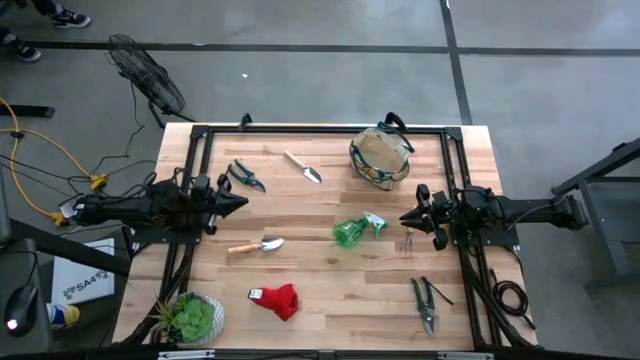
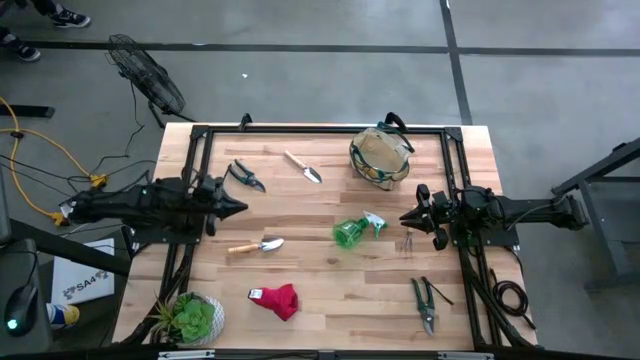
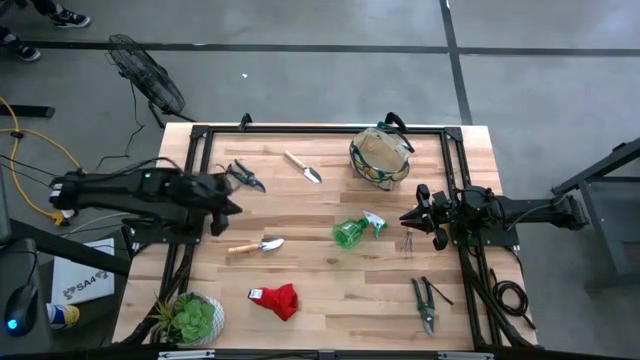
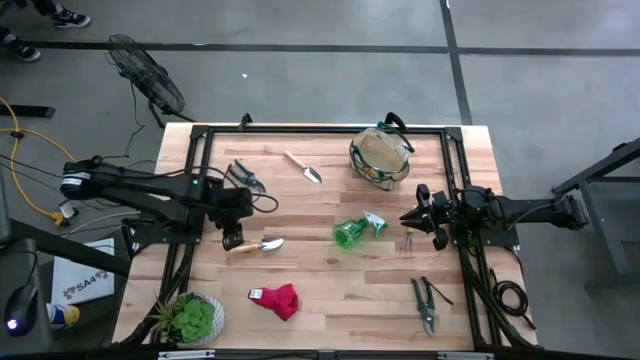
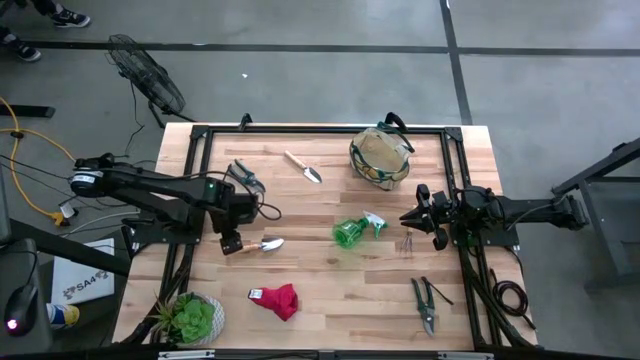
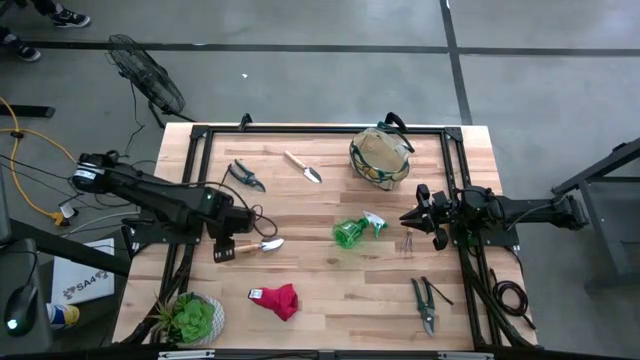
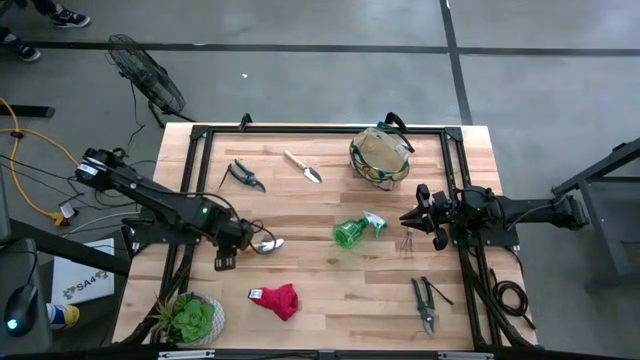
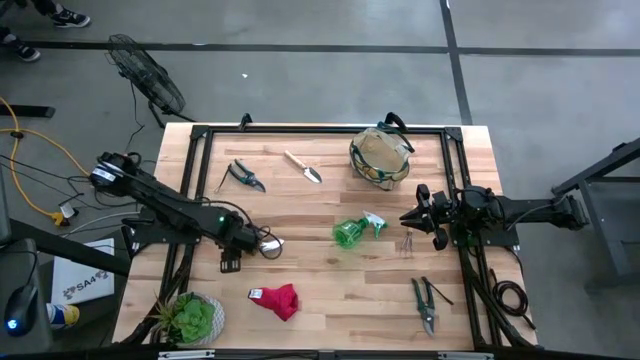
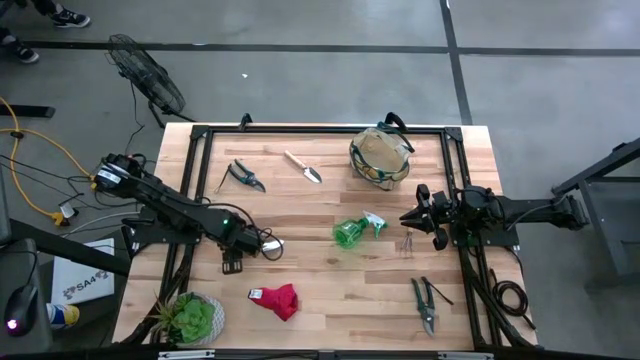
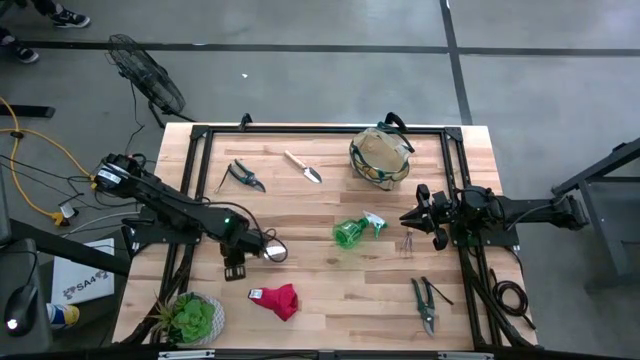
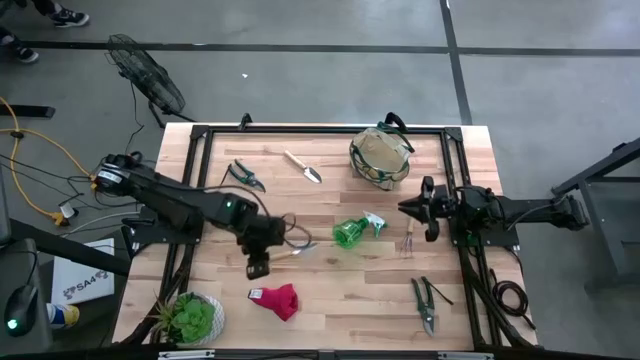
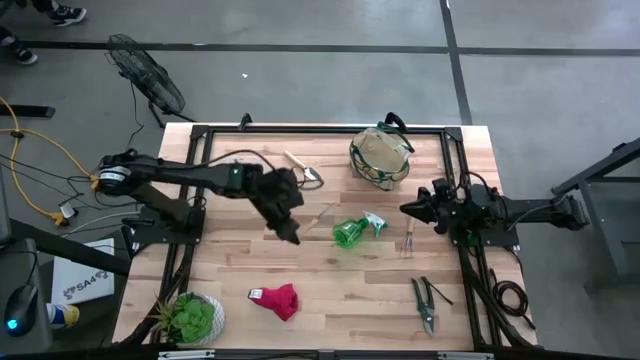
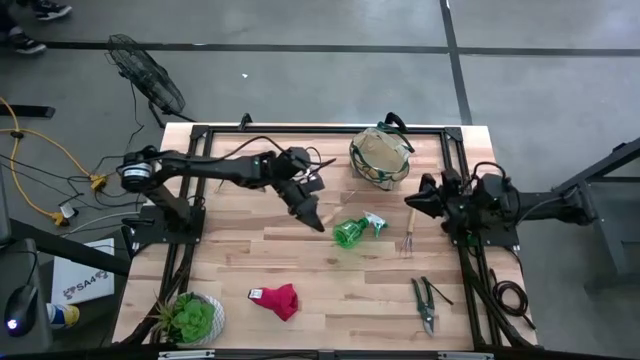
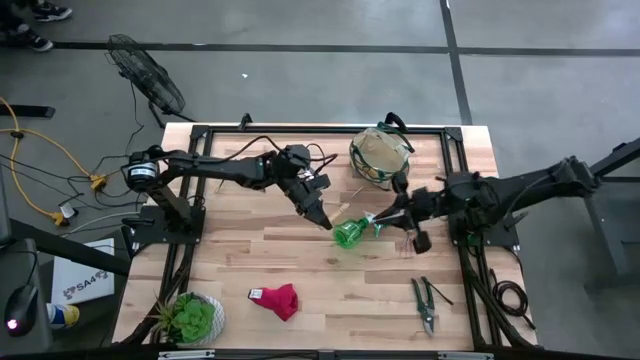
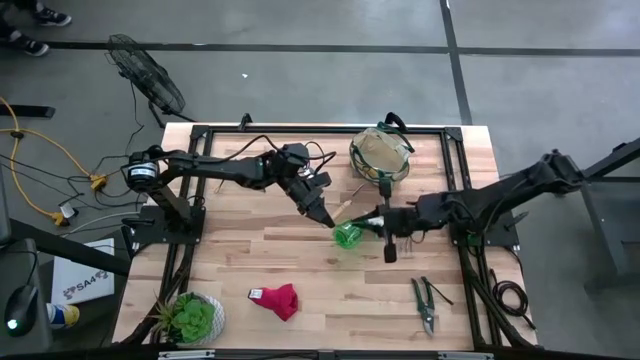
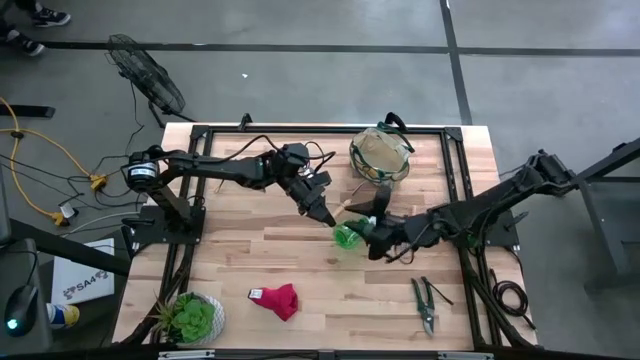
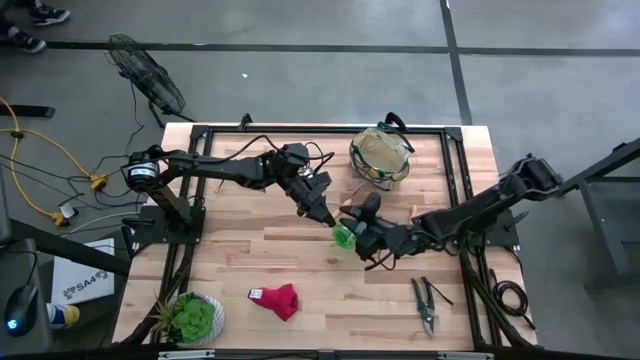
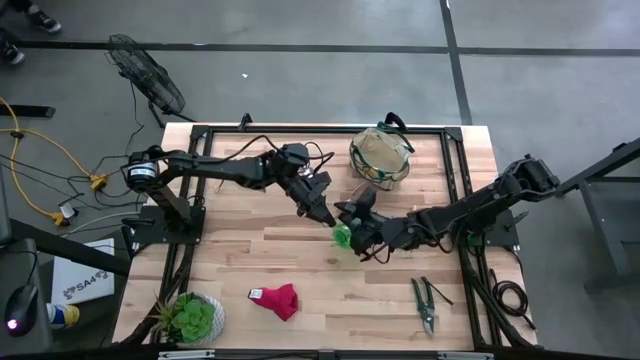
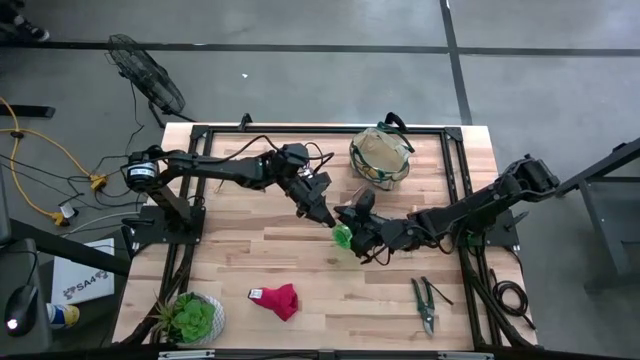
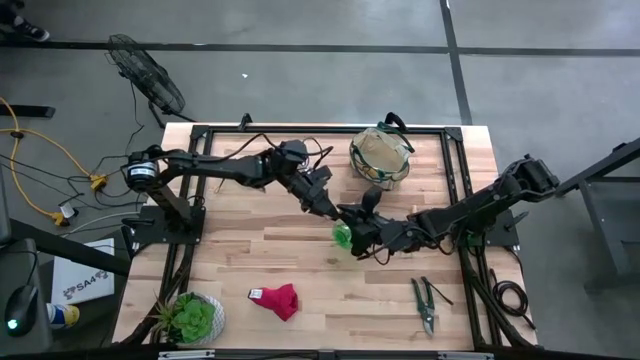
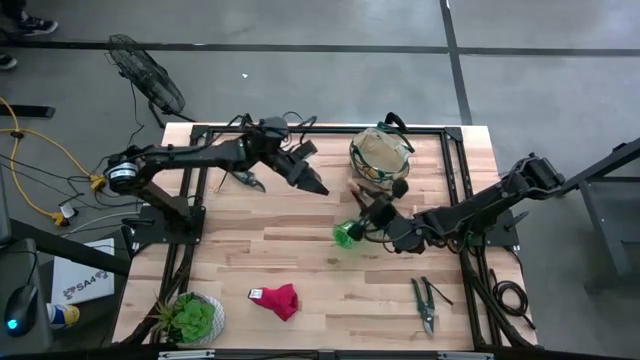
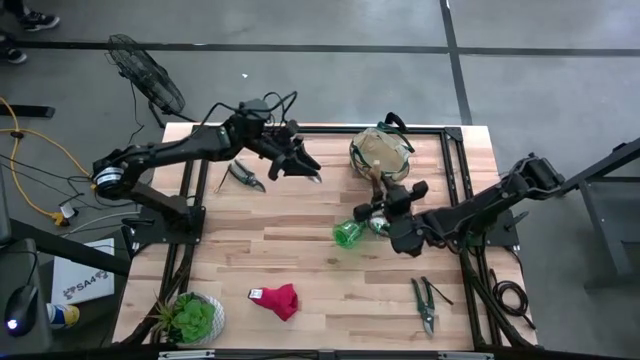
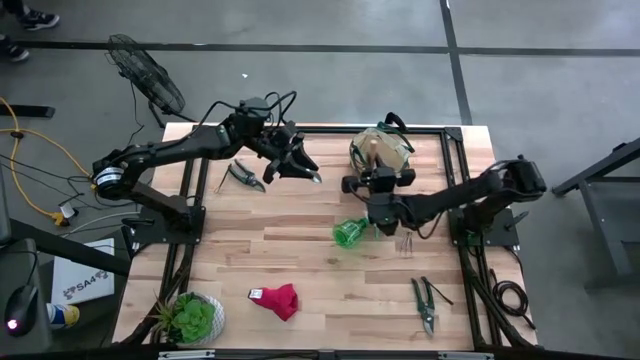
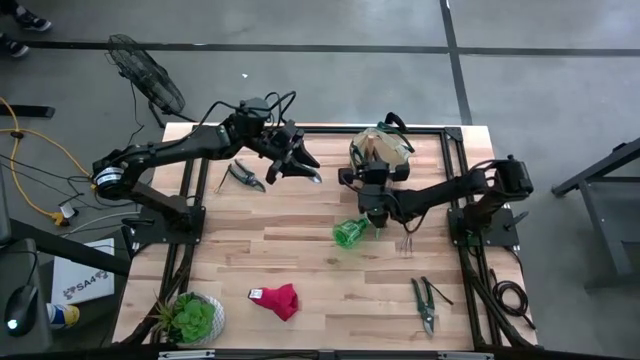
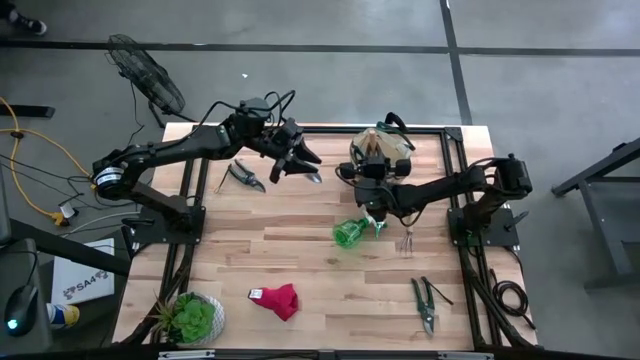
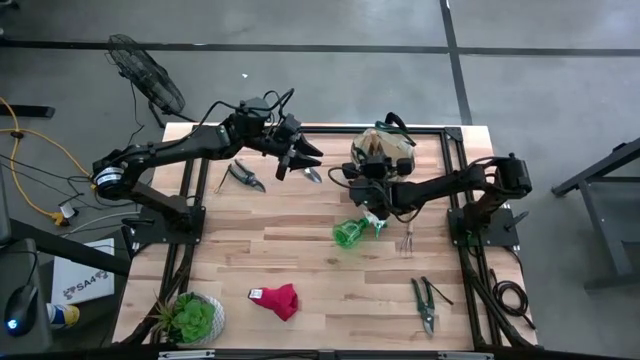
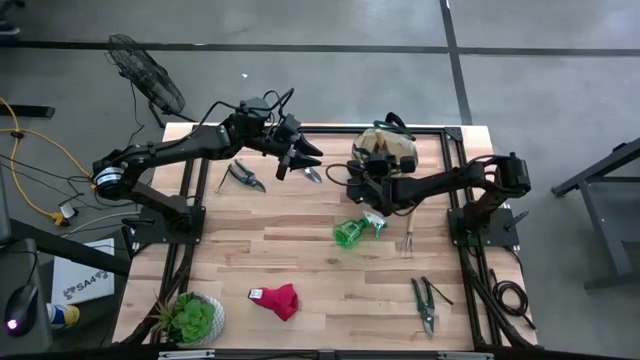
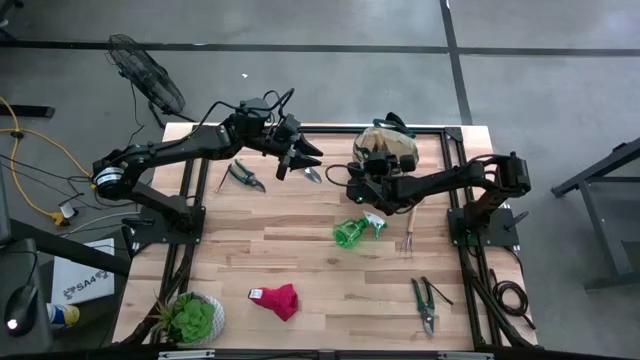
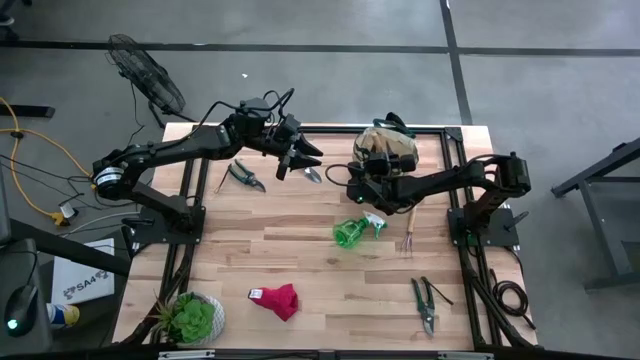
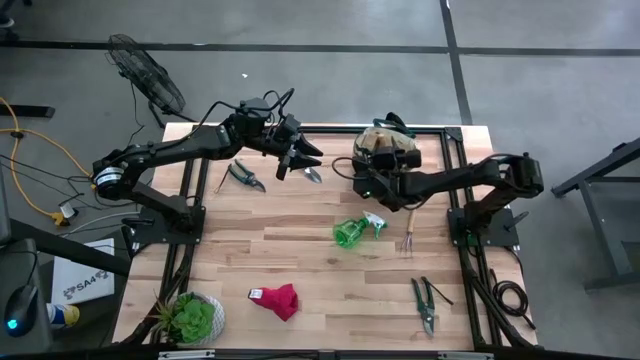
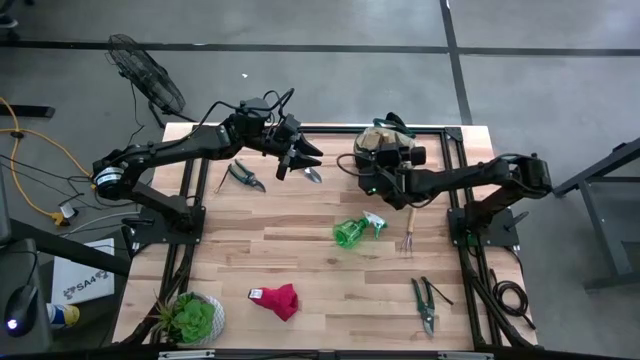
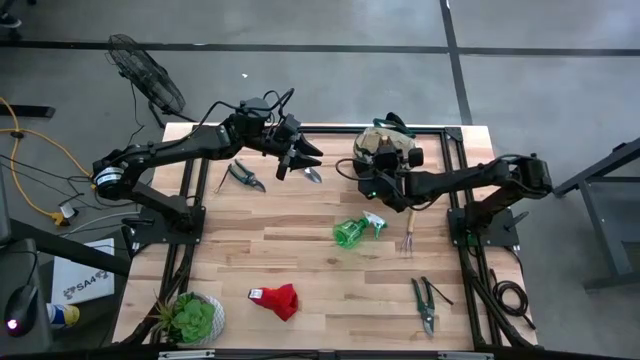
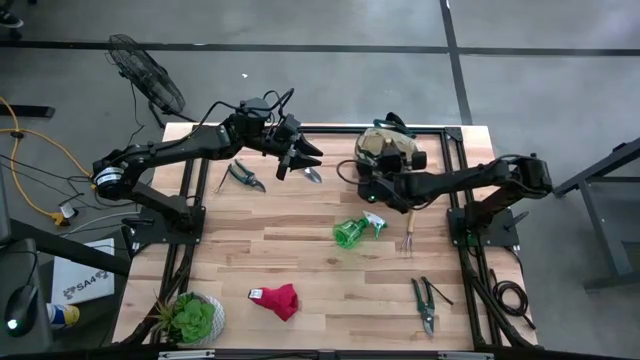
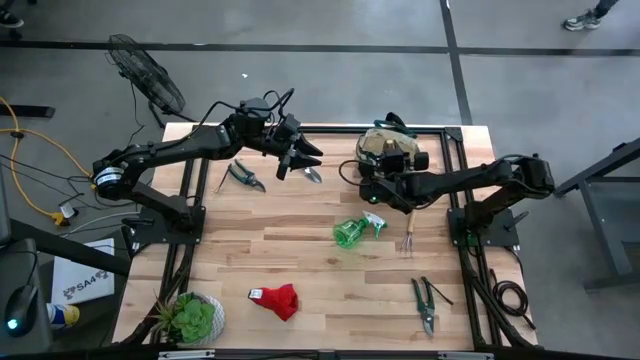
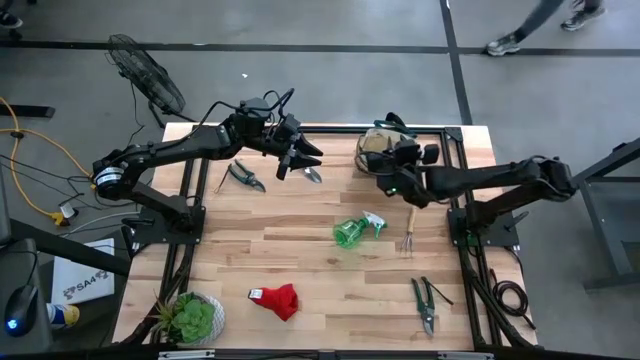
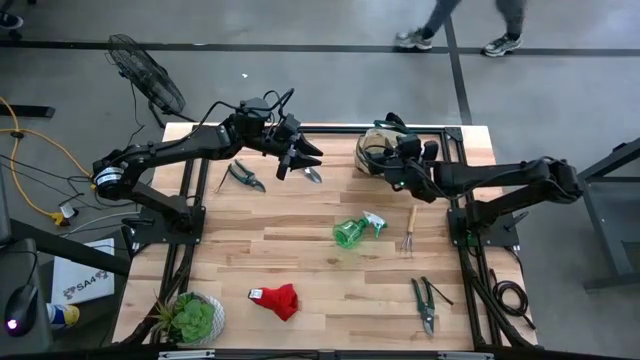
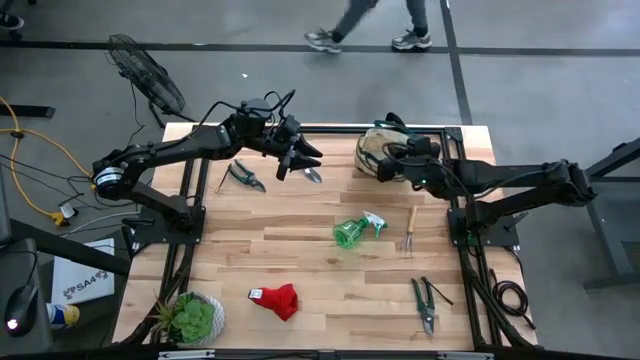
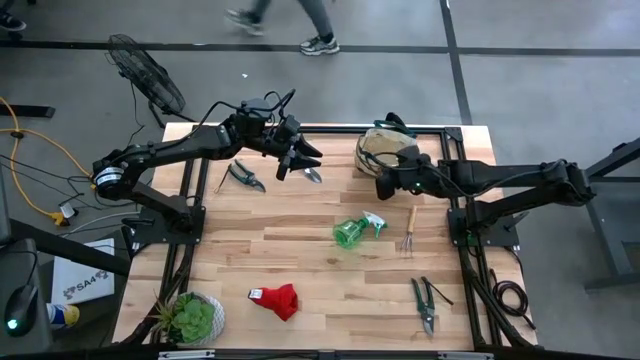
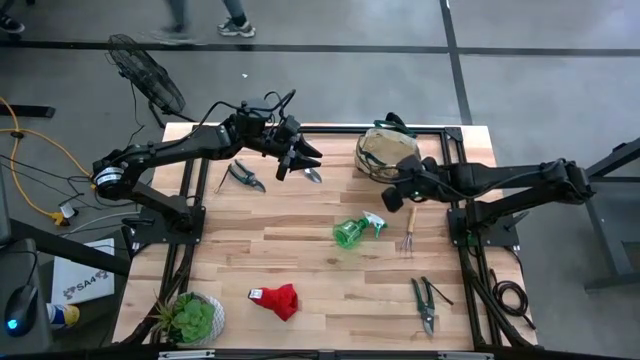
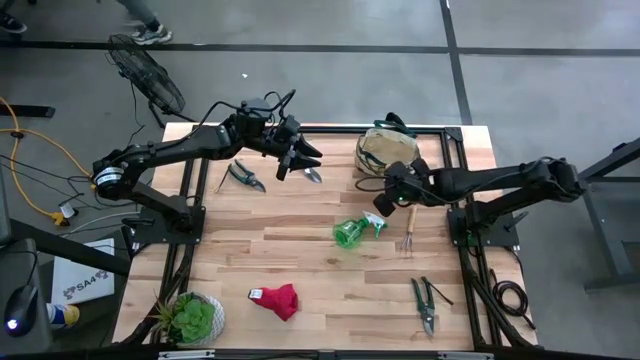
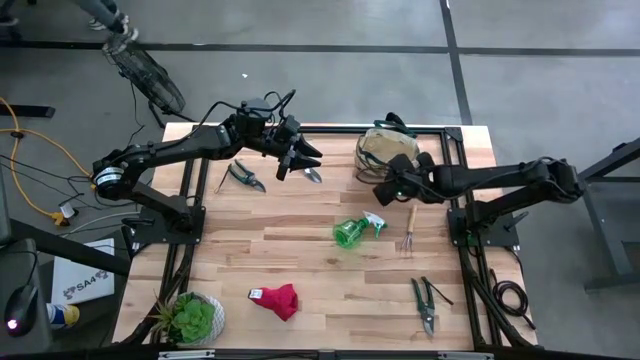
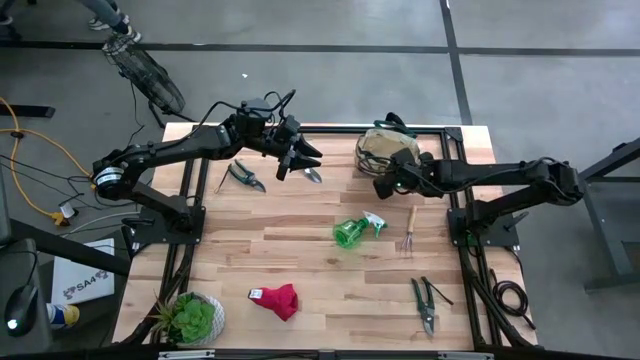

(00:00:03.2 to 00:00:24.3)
Task: Pick & Place Garden tools in Gardening bag
Put the bottom gardening trowel into the gardening bag
